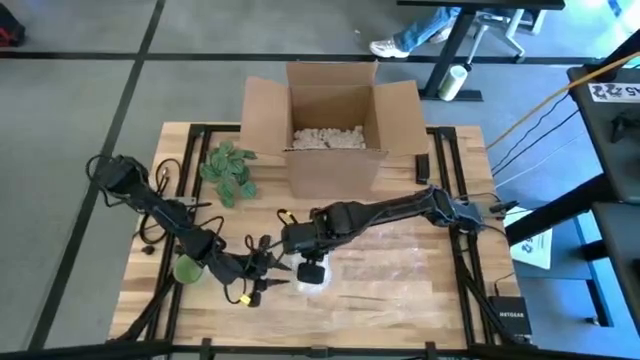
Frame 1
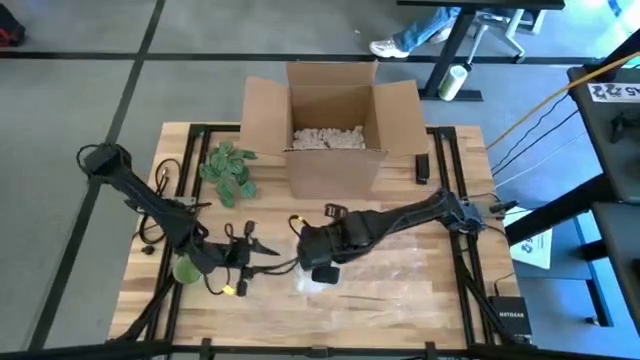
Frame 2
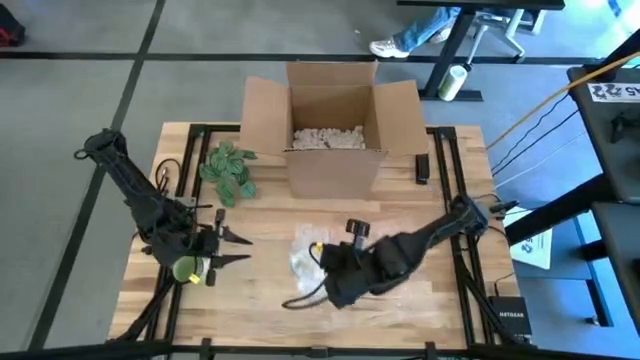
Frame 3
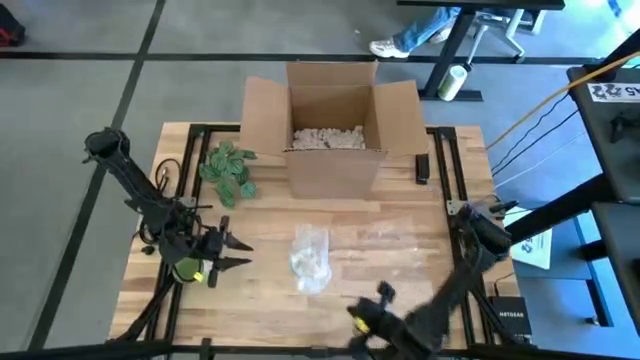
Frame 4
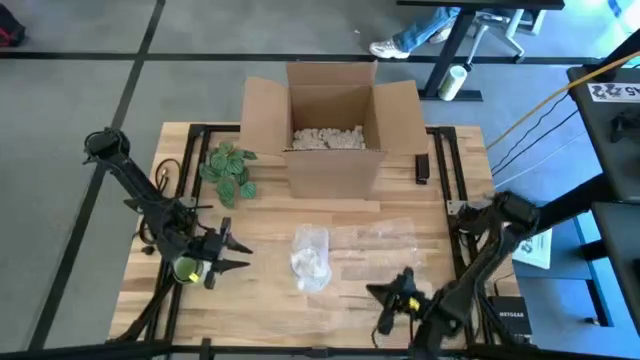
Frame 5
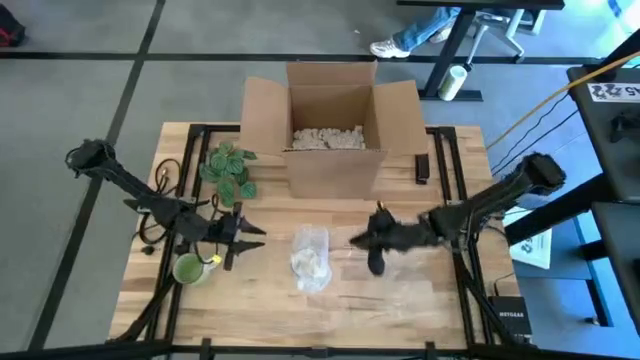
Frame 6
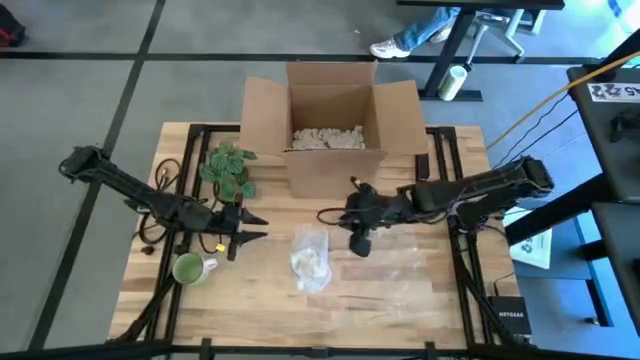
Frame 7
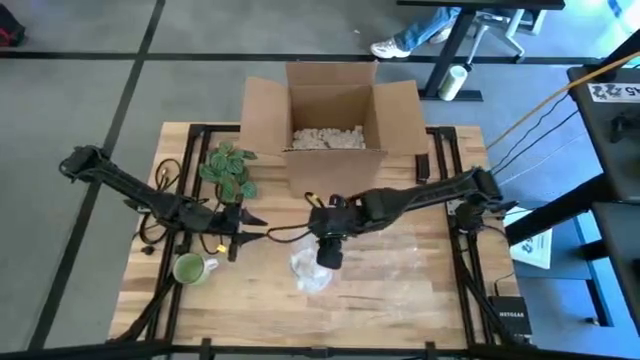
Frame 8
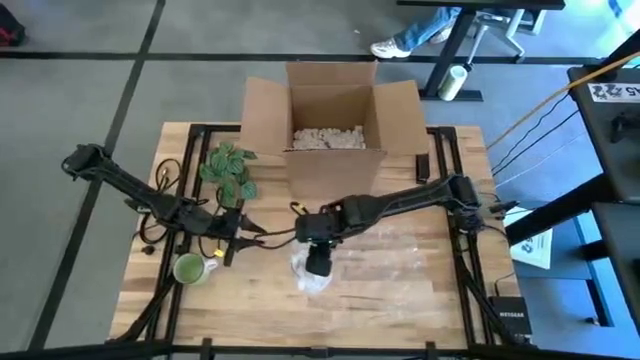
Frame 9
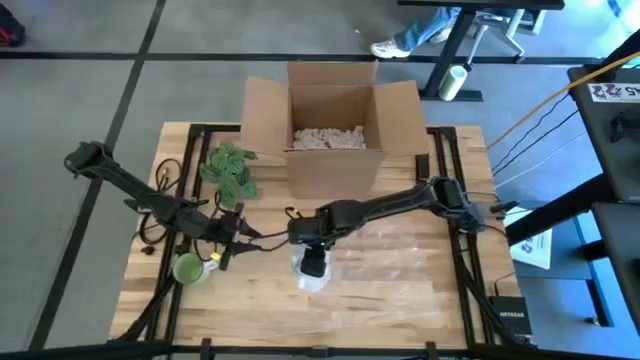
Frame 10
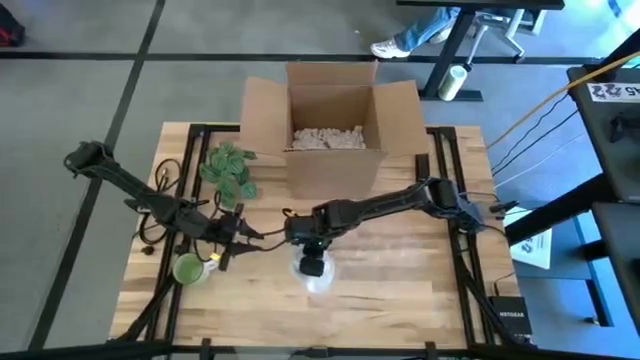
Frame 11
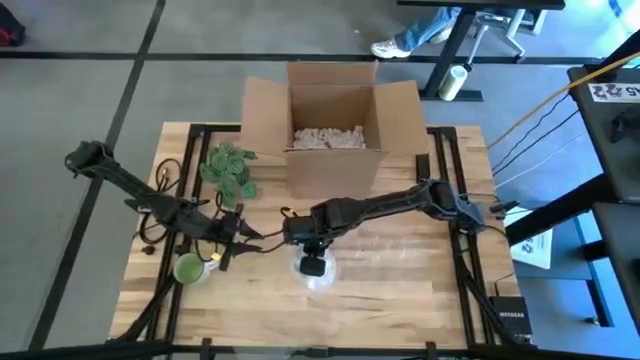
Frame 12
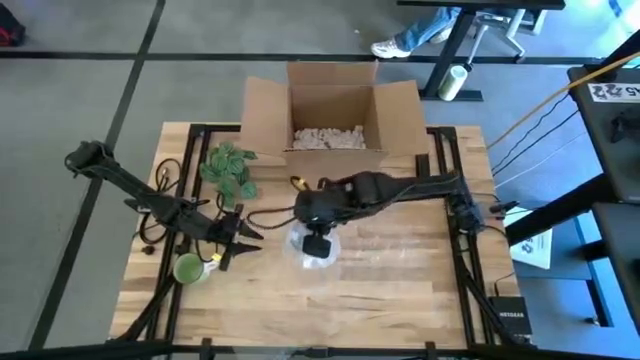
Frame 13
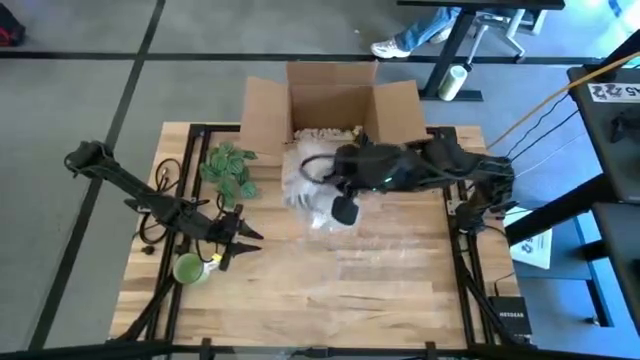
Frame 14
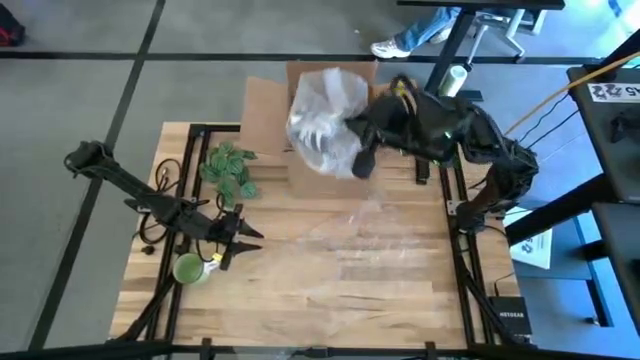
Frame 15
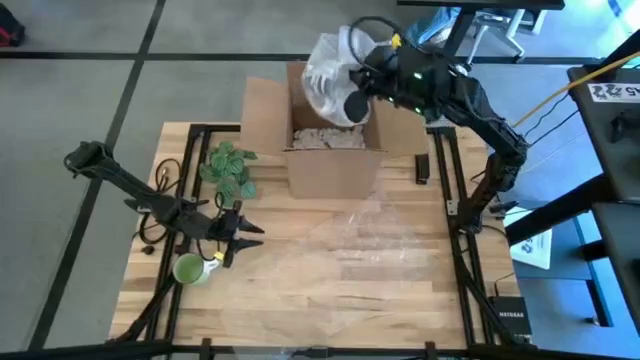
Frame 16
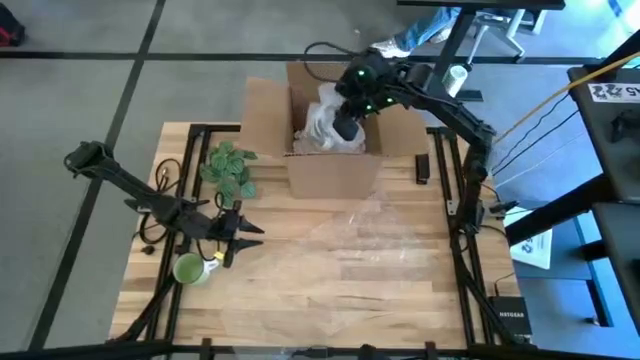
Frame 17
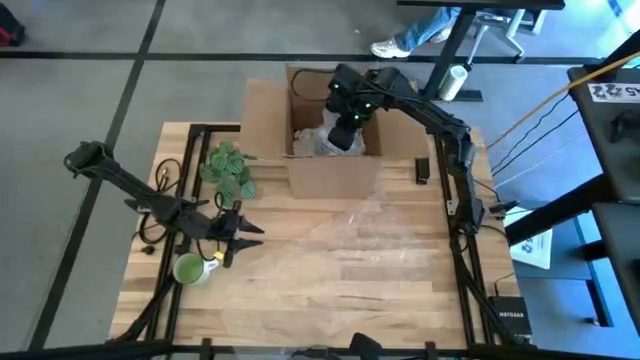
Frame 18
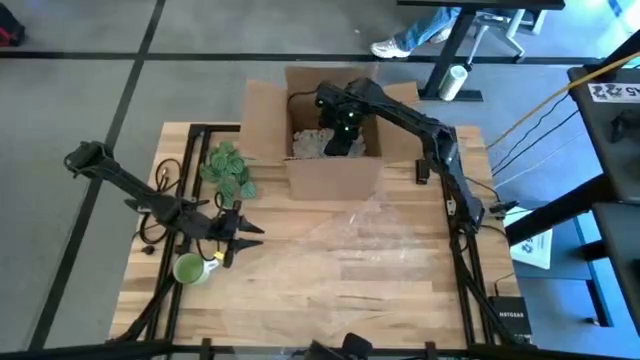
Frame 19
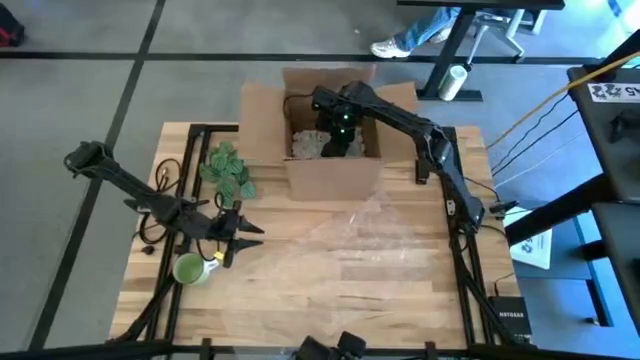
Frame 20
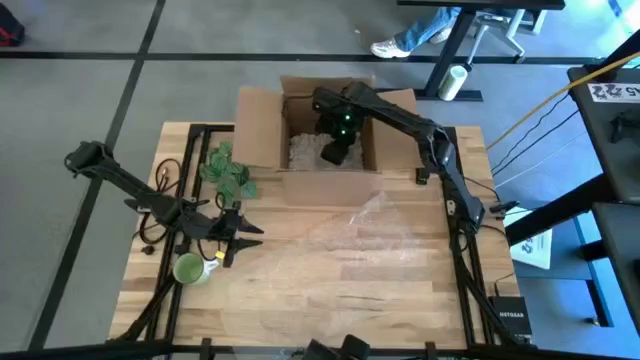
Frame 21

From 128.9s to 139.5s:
Task: wrap mug
Put the wrapped blue patterned mug into the box

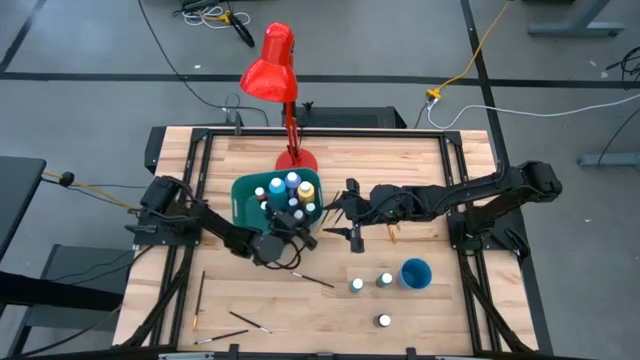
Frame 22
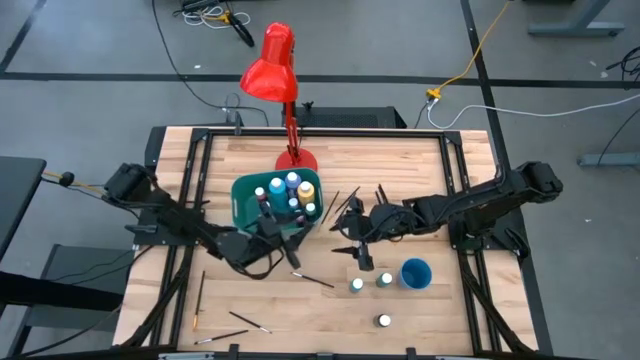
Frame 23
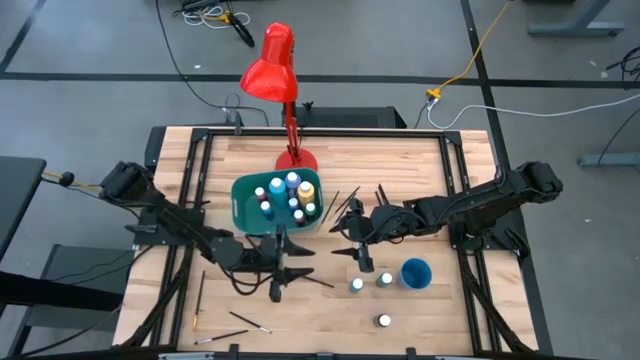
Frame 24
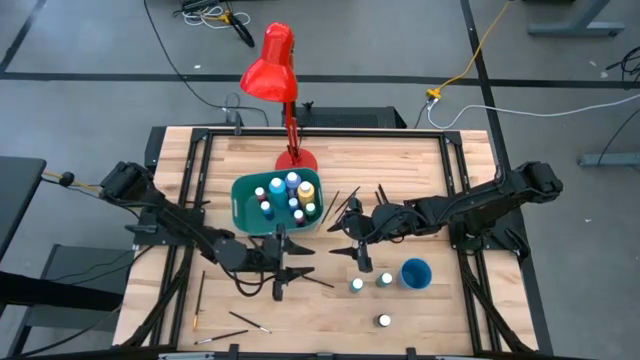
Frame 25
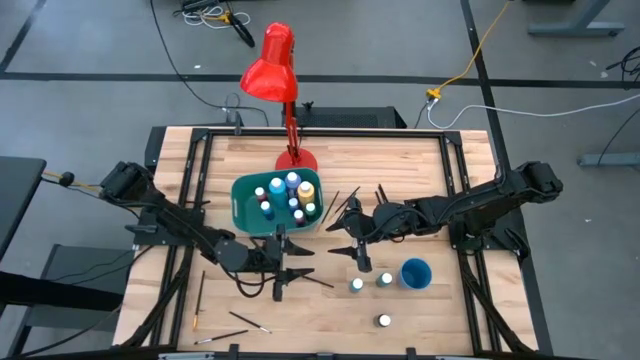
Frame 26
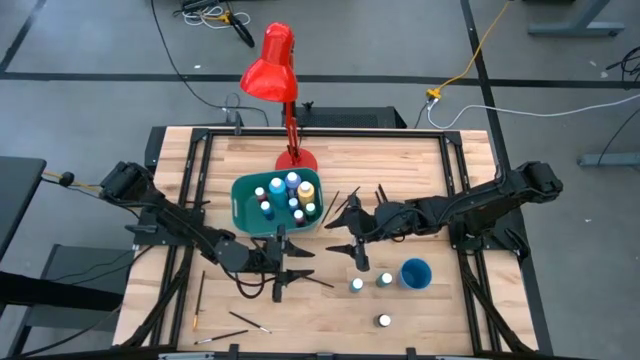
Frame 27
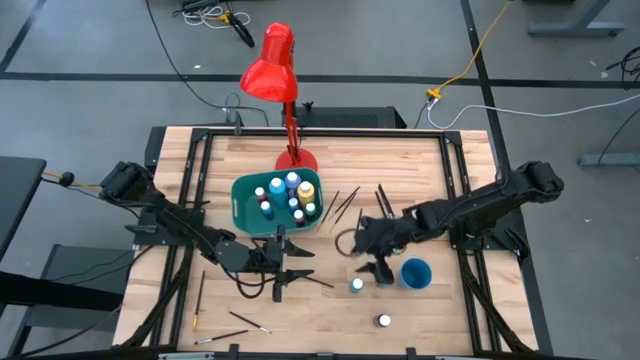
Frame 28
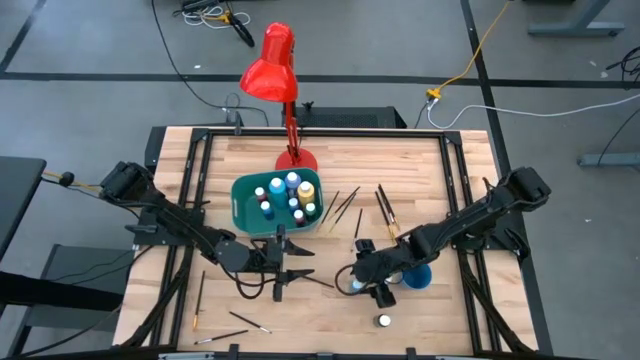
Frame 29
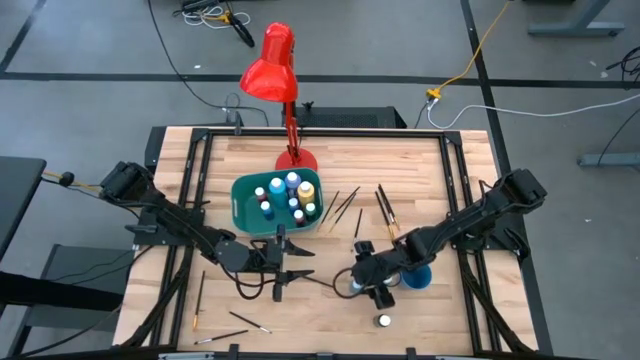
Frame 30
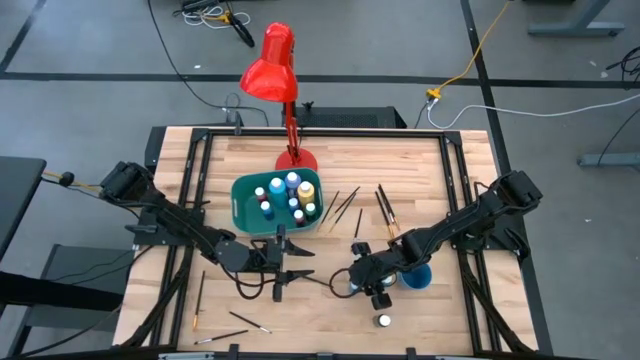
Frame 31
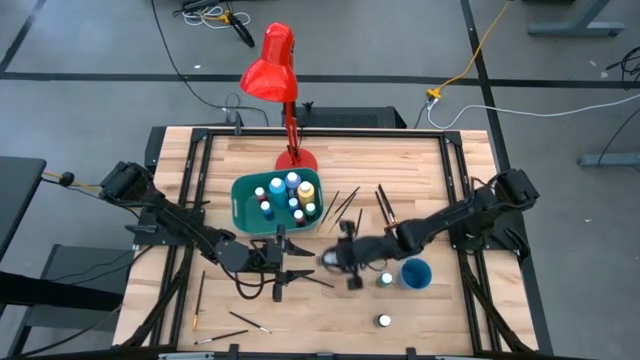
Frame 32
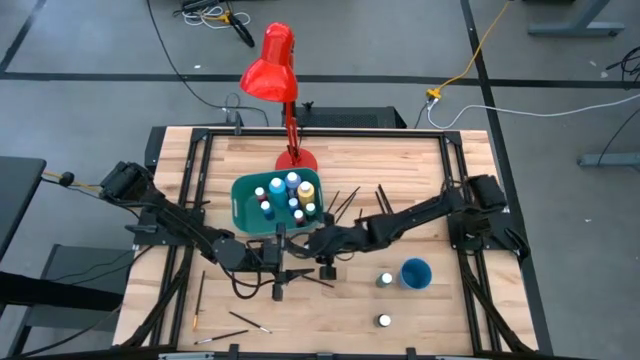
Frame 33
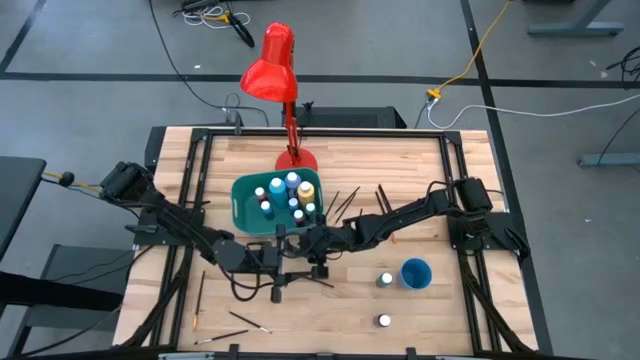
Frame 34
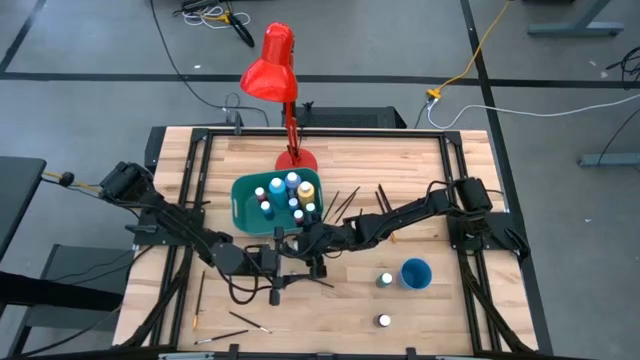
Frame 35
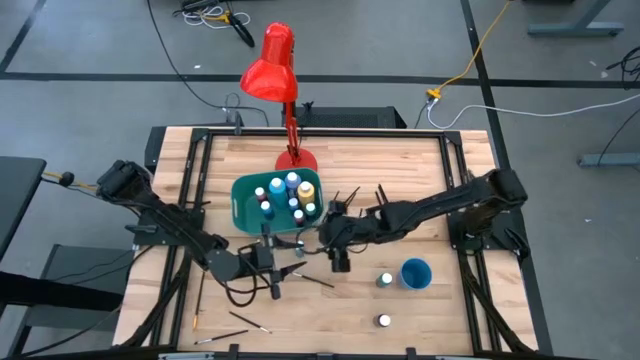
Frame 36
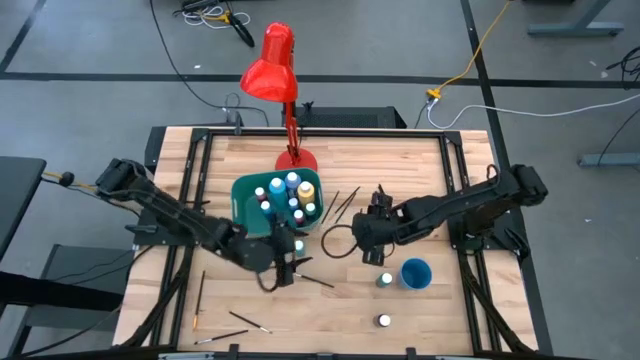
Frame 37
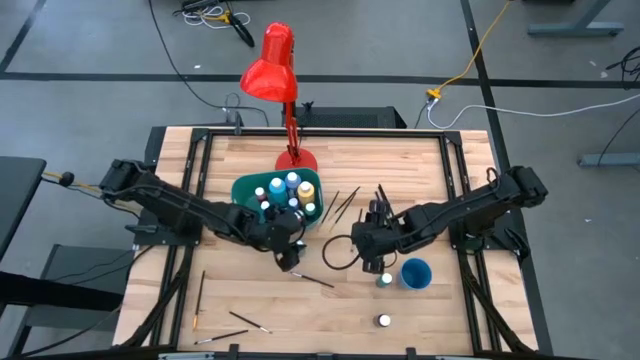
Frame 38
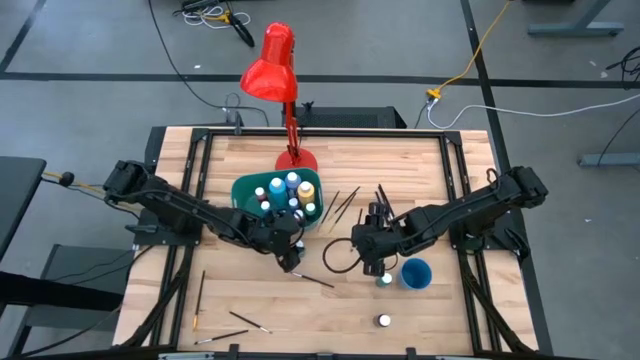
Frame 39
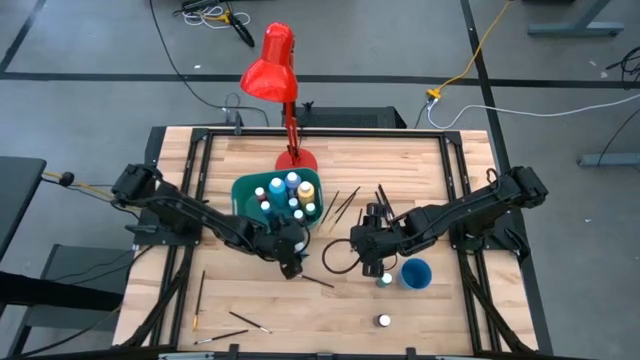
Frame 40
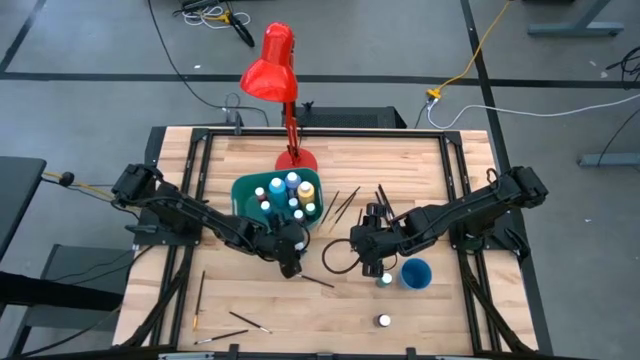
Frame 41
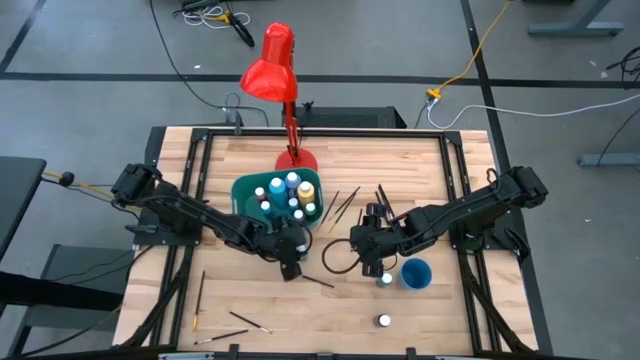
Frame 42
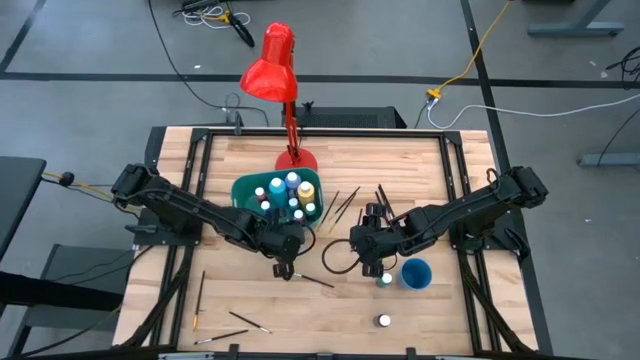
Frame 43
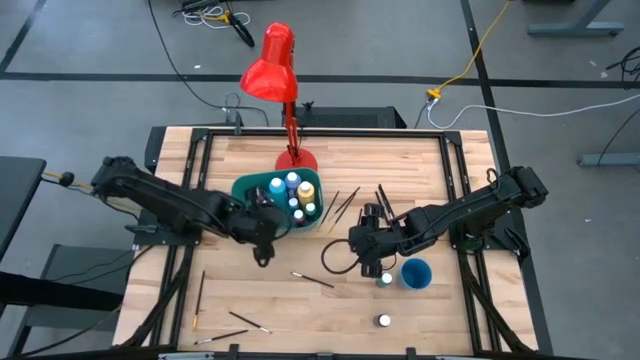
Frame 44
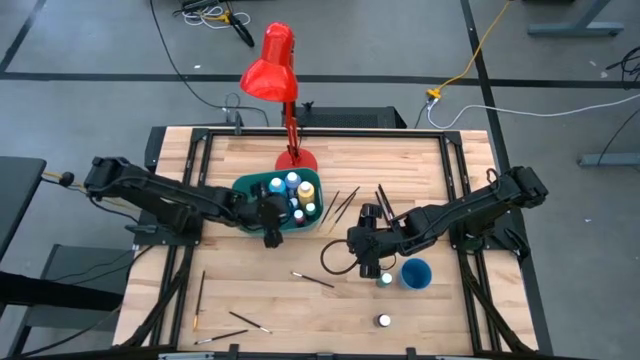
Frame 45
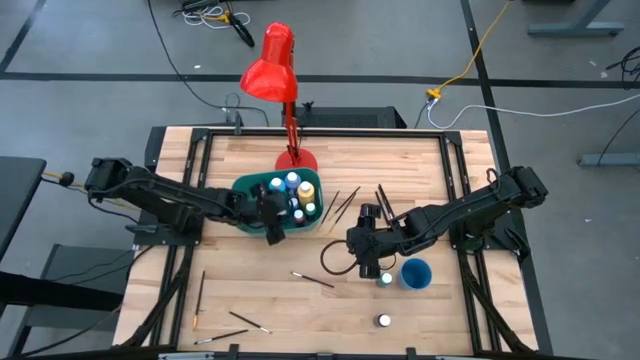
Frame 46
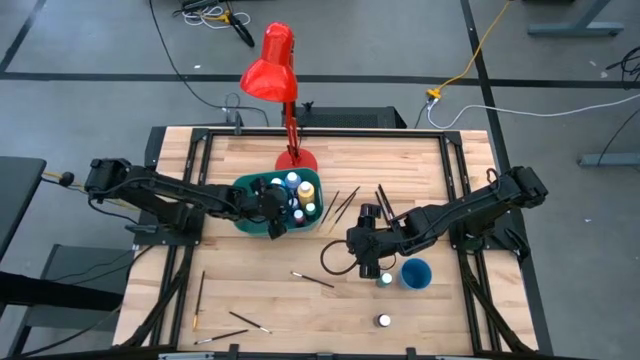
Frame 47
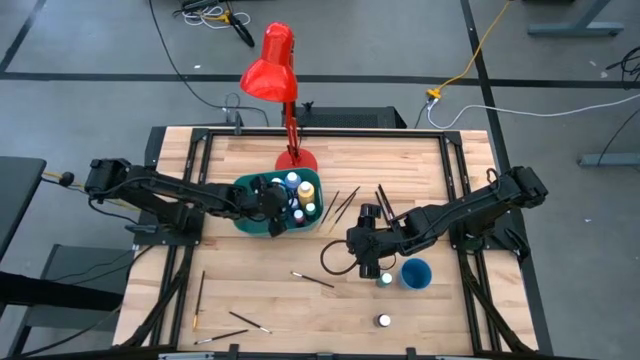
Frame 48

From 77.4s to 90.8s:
Task: Pick & Place Paint Supplies
Put the small light blue paint bottle into the green bin
